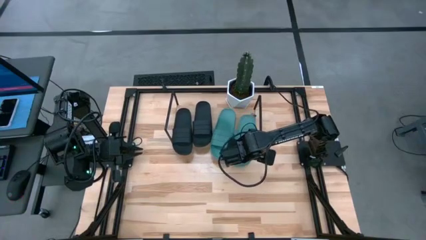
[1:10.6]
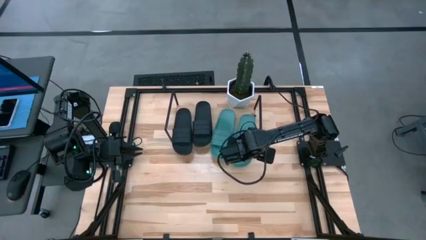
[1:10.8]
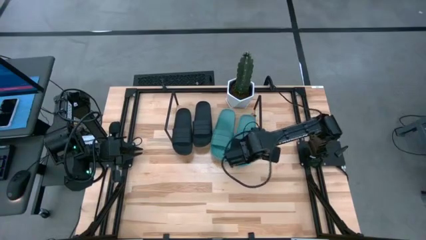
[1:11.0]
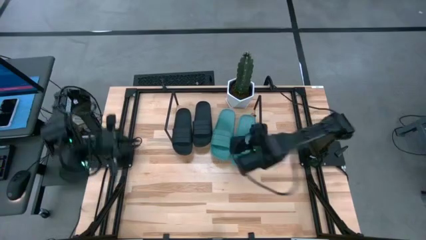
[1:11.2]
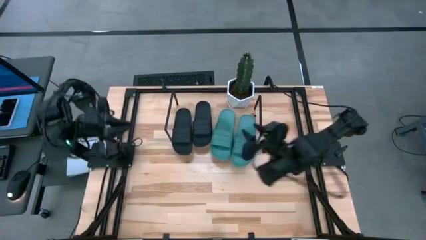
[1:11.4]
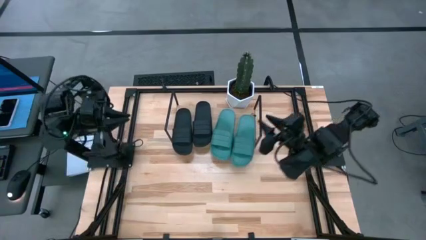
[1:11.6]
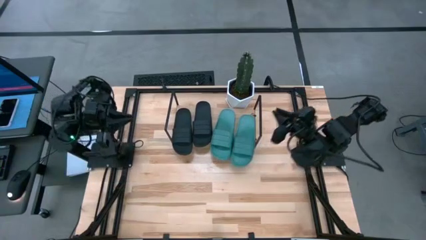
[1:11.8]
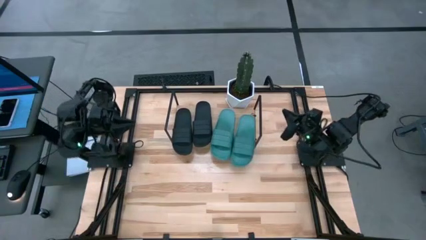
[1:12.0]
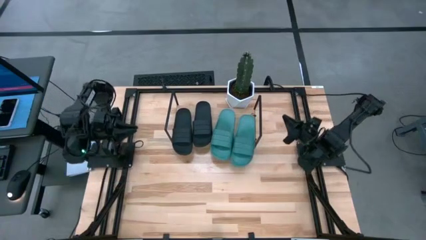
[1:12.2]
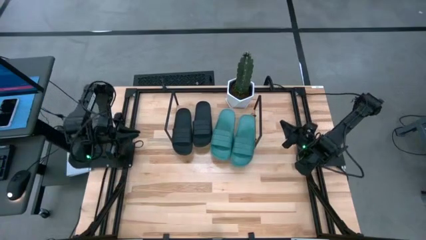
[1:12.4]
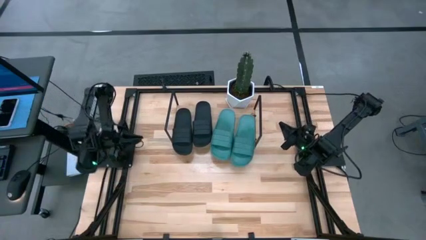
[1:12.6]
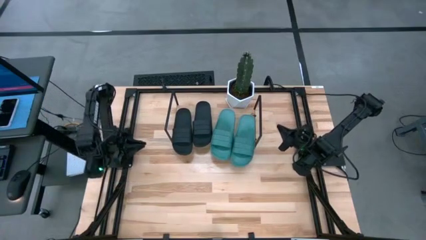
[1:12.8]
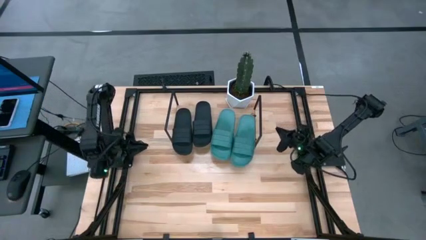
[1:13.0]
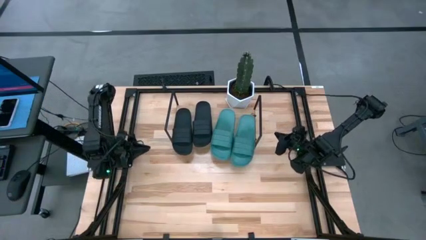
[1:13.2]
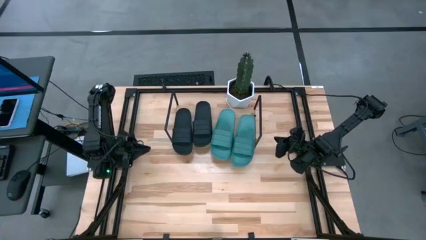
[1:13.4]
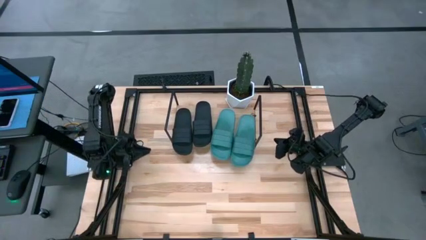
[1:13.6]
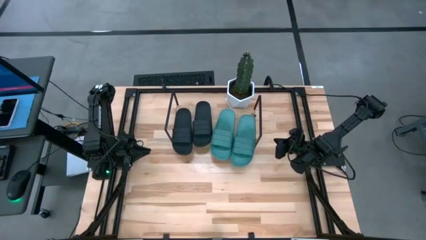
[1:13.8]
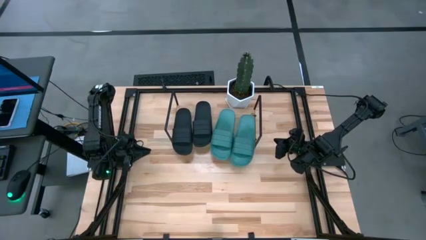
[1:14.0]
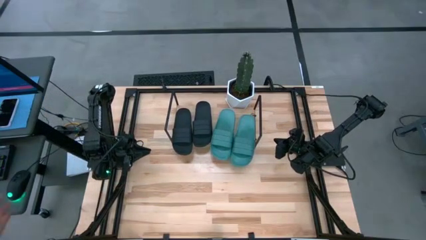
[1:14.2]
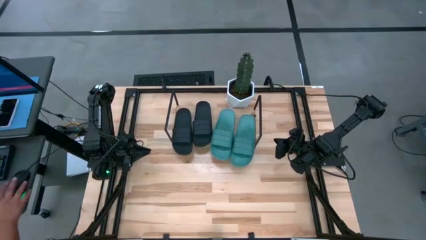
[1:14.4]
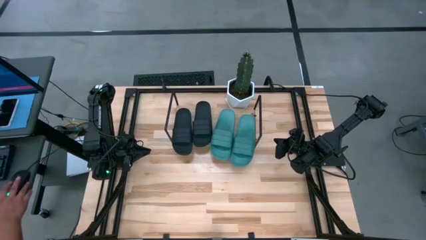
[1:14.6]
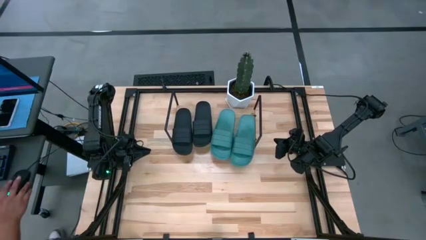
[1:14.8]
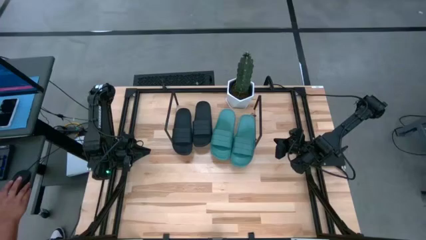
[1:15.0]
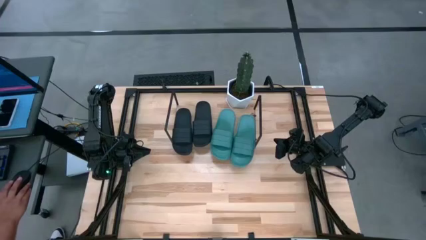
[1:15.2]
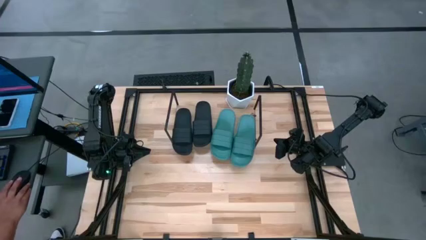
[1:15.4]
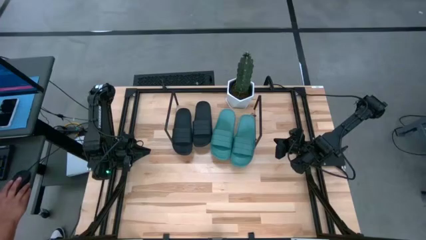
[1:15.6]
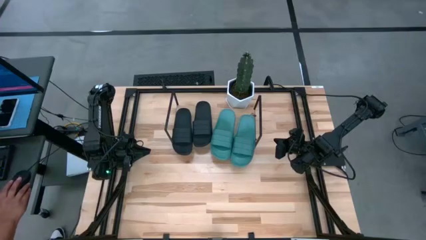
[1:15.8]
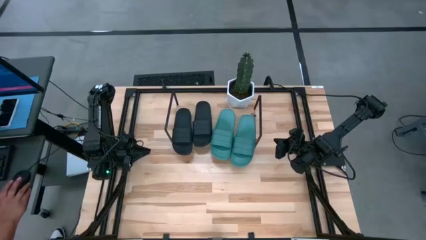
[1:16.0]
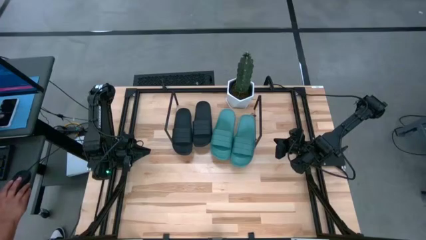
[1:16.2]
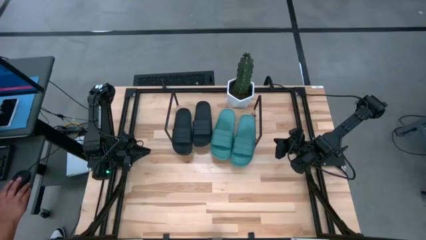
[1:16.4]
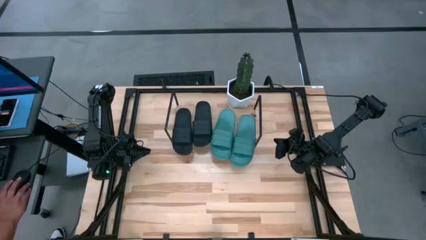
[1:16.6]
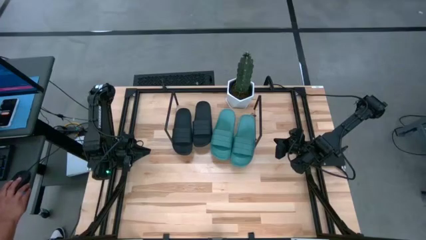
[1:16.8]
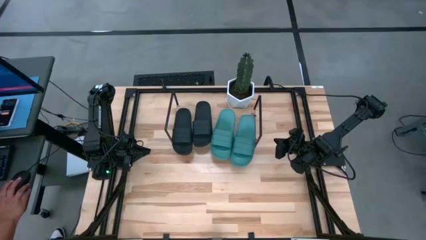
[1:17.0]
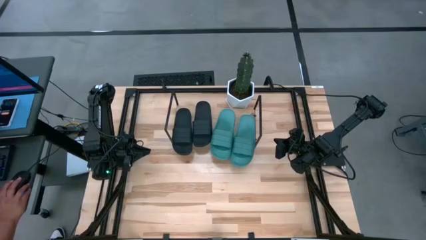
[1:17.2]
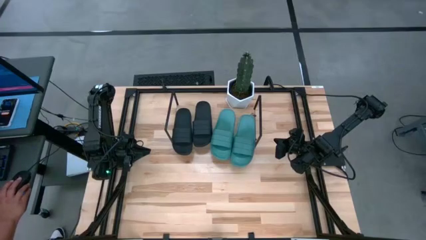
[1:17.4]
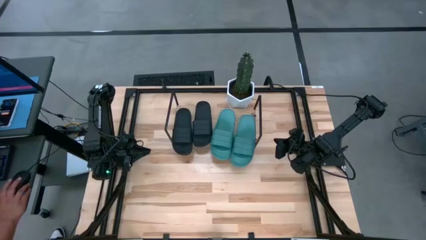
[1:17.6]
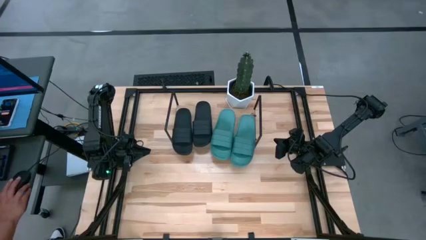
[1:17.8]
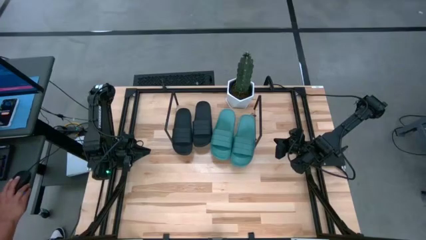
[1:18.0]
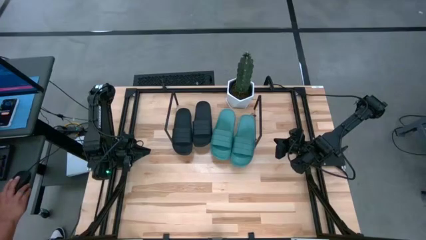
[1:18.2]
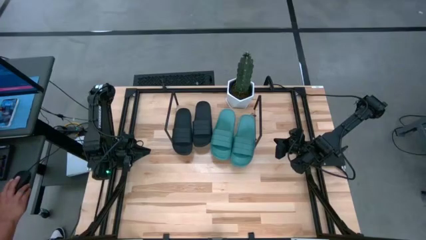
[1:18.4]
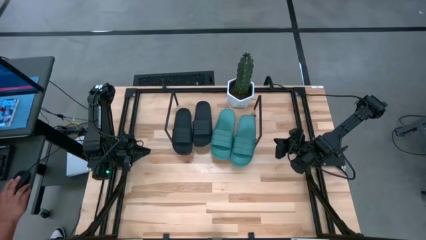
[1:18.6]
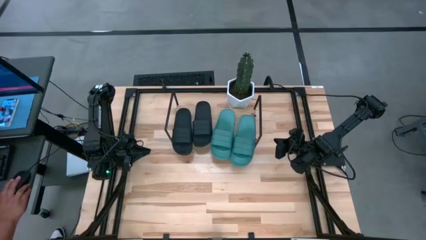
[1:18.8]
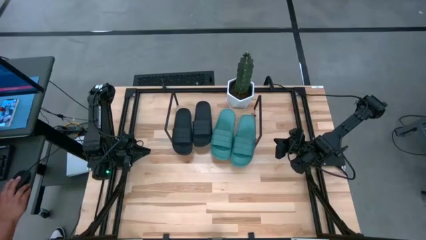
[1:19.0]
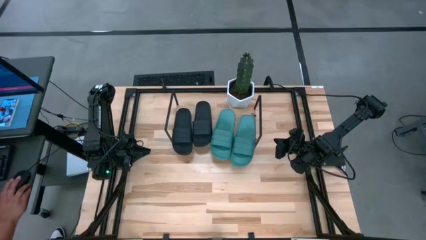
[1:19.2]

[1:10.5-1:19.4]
Task: Pick and place slides into the shelf
Return to Home Position

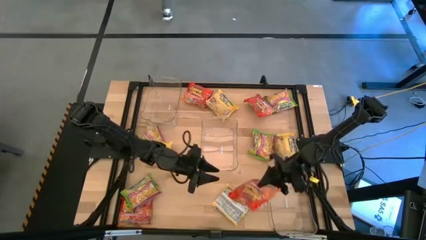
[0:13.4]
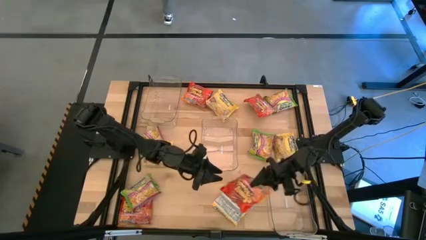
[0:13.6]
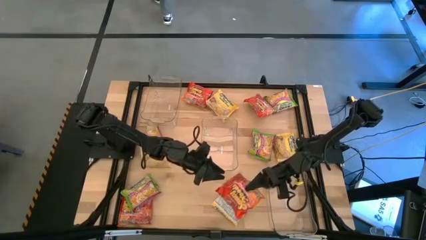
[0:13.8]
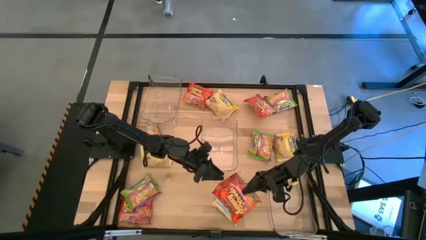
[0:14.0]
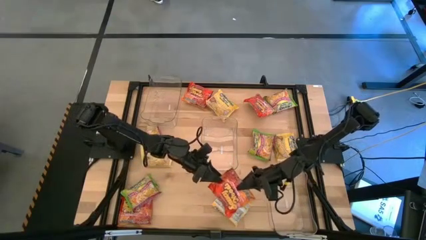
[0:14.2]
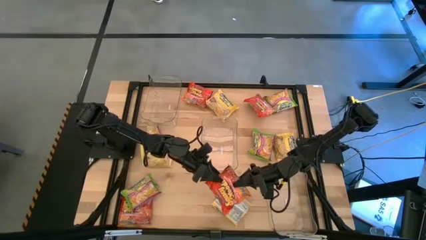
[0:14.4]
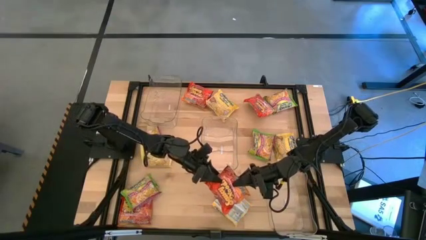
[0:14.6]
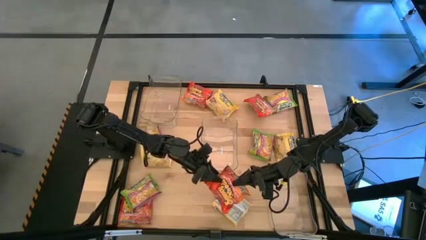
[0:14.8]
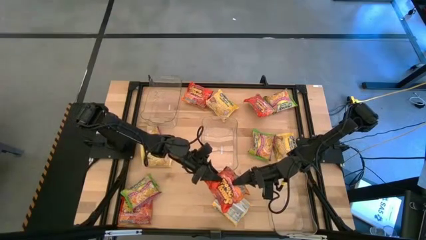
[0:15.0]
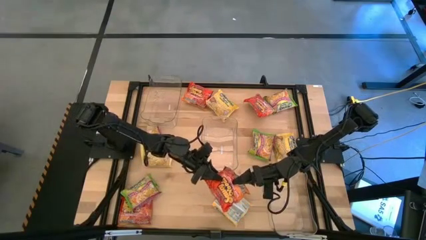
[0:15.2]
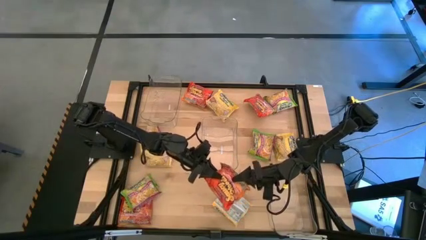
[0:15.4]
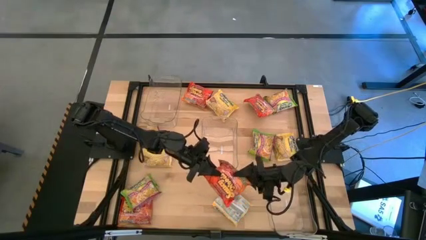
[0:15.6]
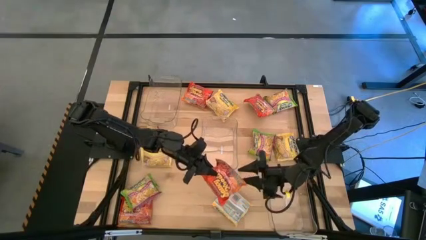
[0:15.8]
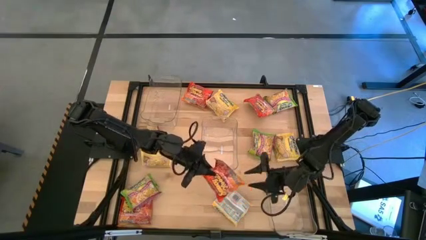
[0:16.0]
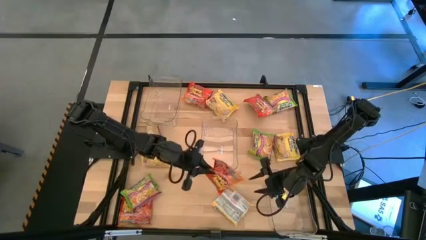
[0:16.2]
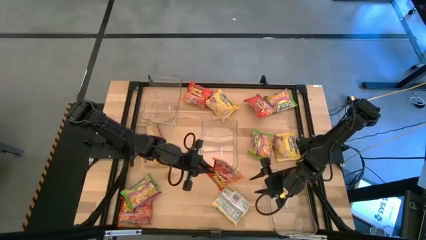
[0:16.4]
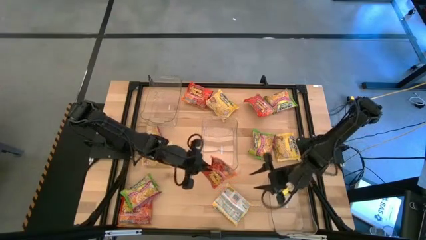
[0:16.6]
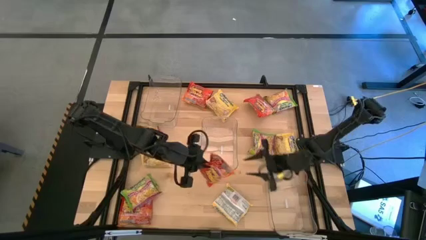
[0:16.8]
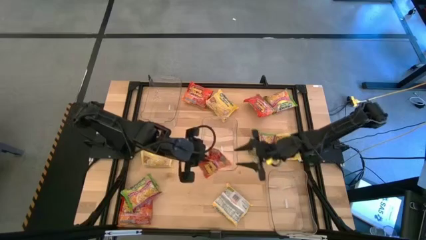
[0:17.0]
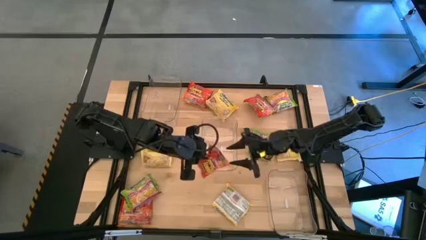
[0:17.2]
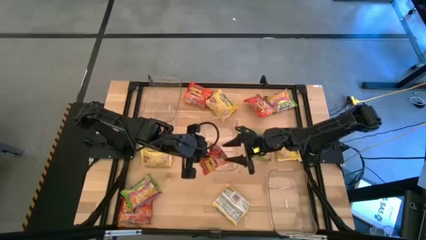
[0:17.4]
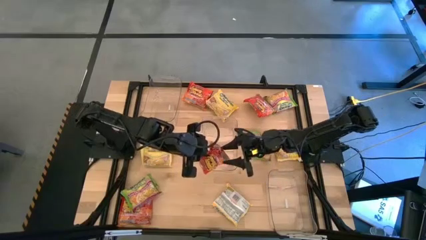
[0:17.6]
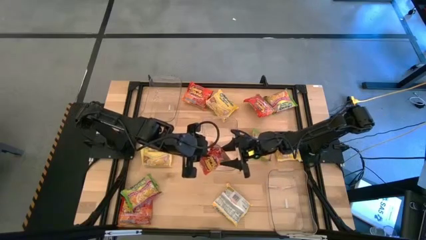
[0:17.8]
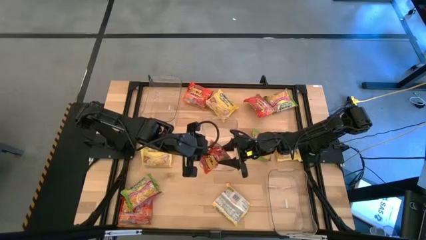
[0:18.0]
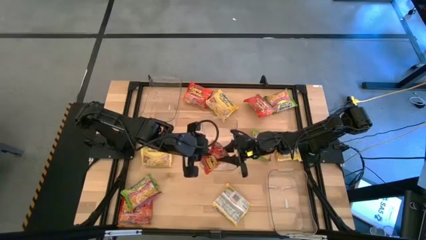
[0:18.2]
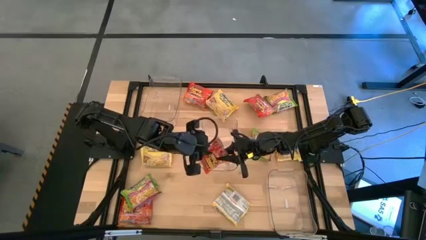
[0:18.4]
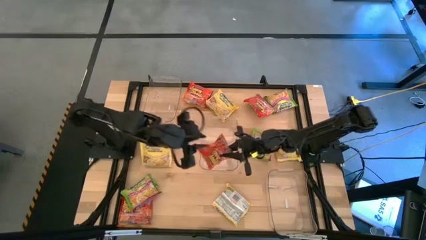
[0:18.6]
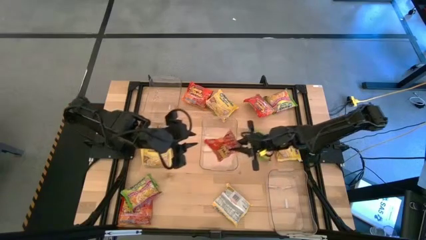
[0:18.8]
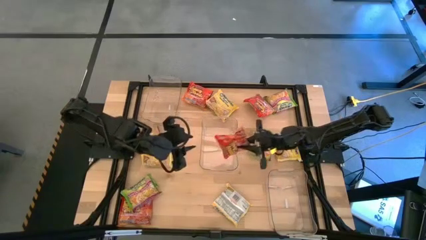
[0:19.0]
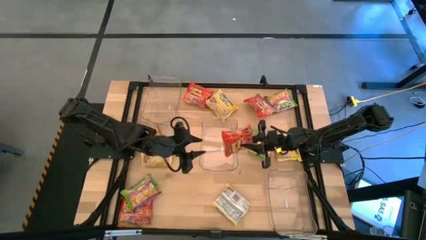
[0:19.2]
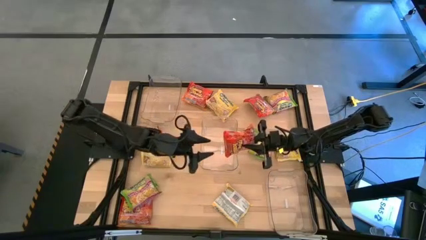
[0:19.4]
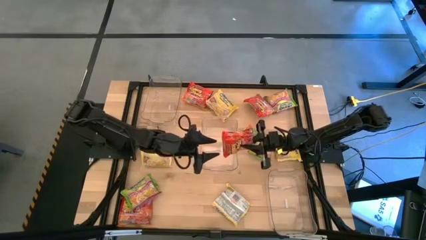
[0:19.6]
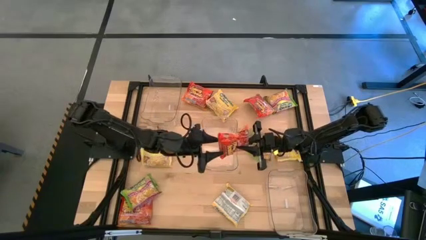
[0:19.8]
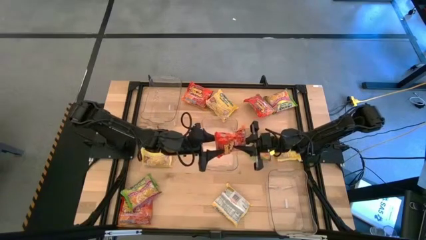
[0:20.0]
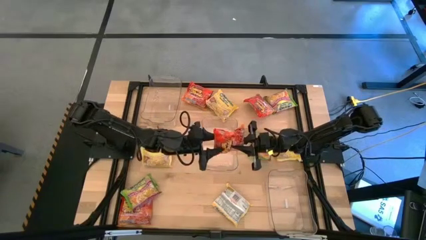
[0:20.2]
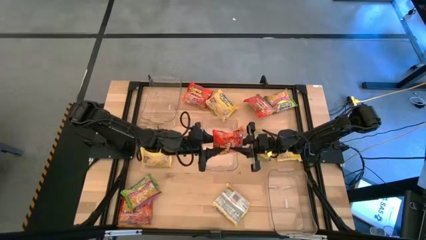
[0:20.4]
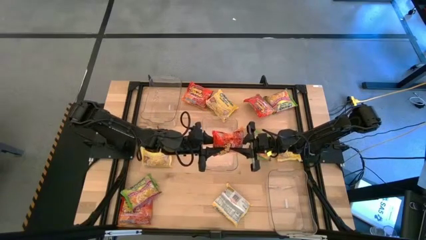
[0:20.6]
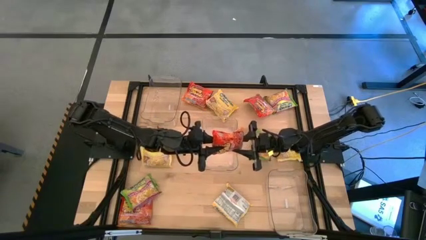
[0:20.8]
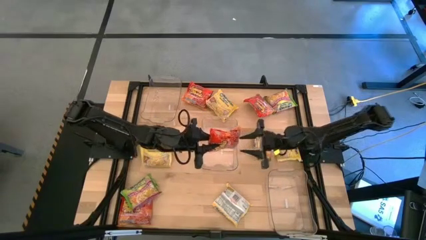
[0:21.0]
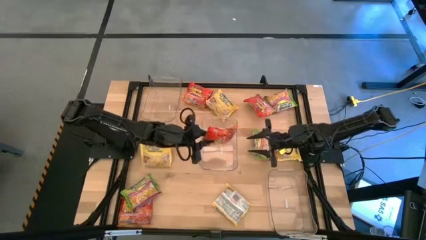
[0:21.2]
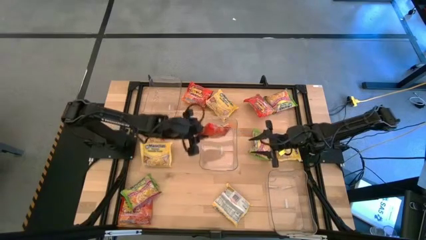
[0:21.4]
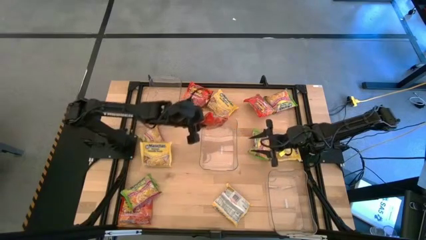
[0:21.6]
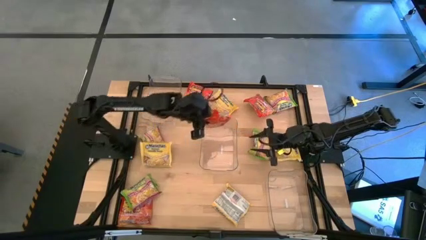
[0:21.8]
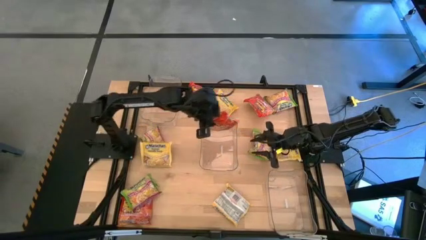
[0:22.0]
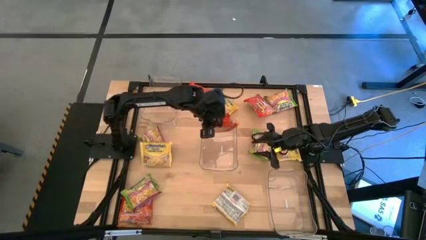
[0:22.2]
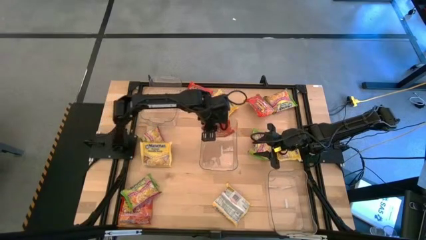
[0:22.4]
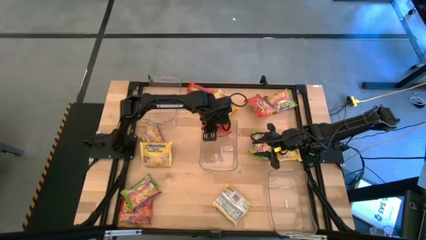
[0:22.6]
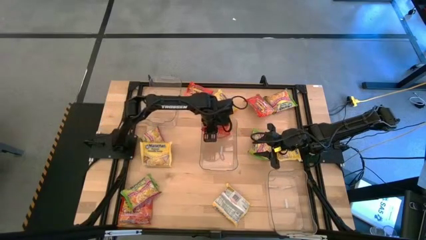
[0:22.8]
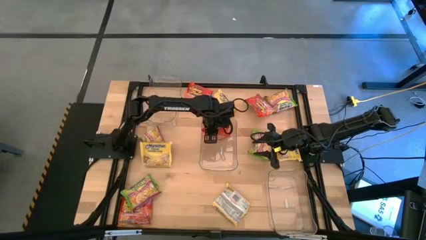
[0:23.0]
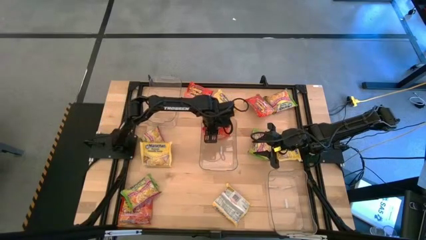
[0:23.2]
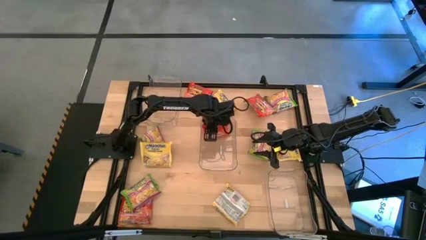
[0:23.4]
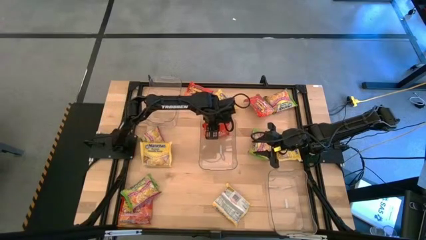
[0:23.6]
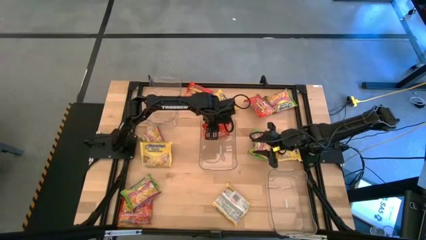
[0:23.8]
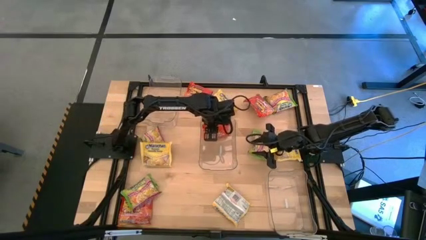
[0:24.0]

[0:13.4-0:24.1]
Task: Sort Maruchan noodles
Put the bottom right orange noodle pack into the middle transparent bin
